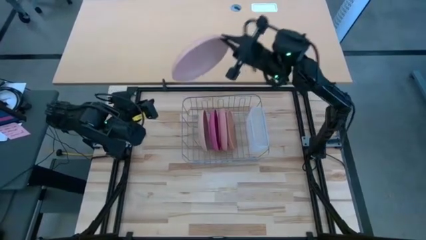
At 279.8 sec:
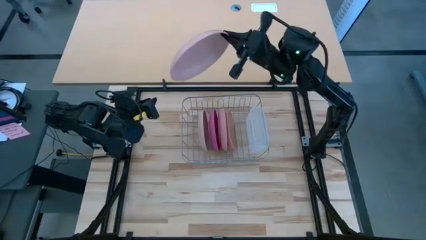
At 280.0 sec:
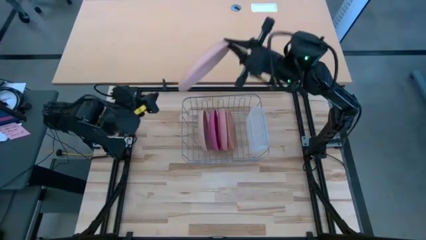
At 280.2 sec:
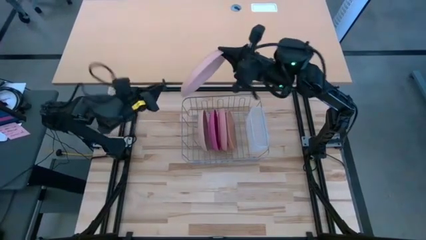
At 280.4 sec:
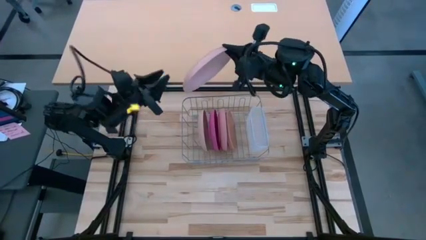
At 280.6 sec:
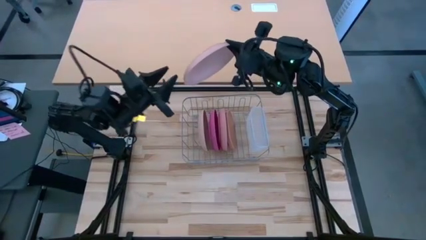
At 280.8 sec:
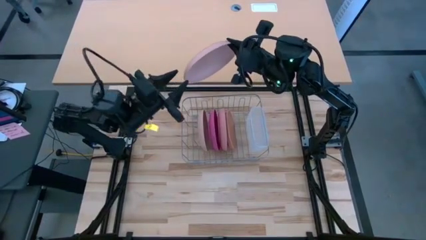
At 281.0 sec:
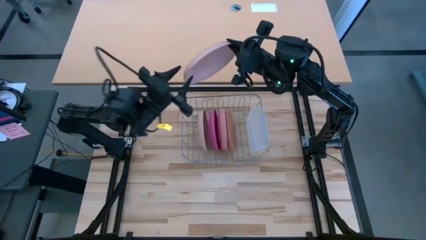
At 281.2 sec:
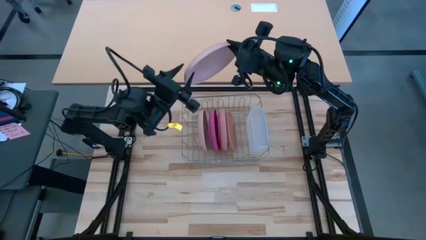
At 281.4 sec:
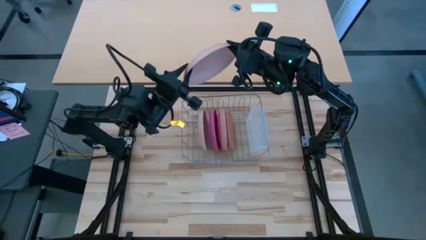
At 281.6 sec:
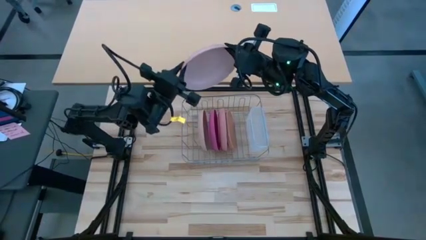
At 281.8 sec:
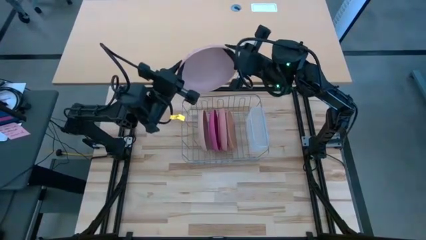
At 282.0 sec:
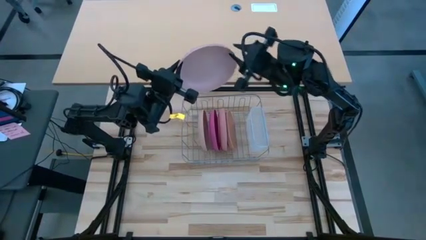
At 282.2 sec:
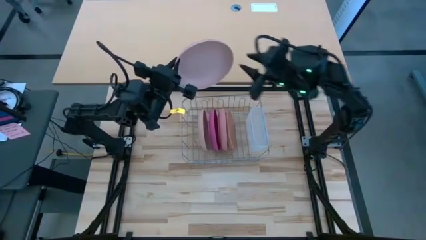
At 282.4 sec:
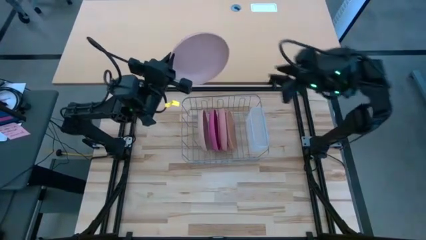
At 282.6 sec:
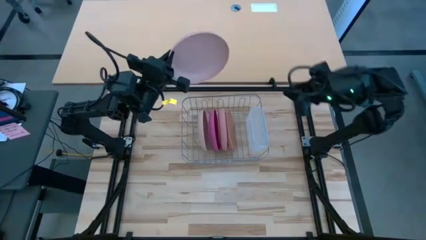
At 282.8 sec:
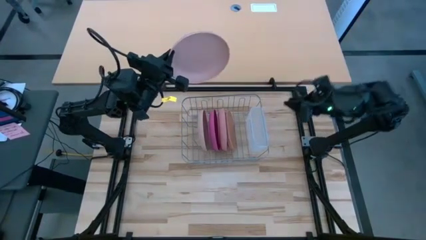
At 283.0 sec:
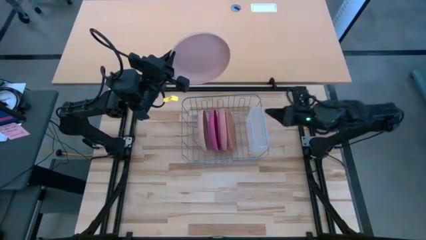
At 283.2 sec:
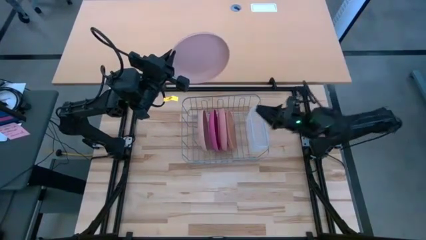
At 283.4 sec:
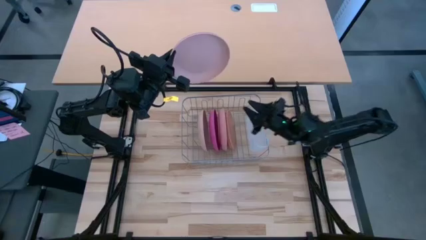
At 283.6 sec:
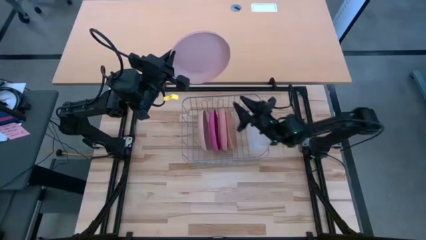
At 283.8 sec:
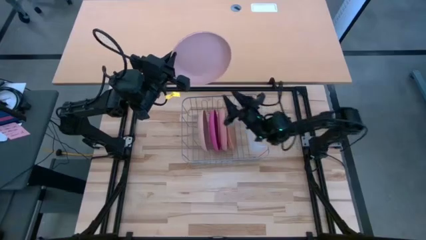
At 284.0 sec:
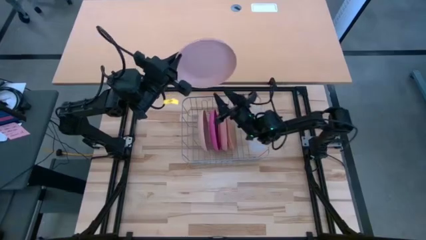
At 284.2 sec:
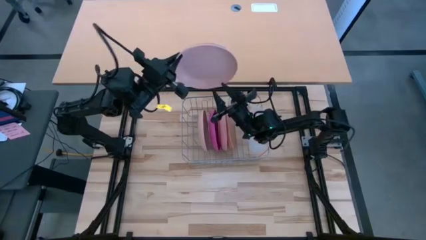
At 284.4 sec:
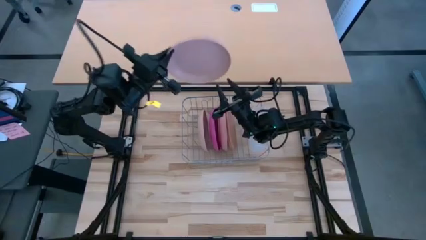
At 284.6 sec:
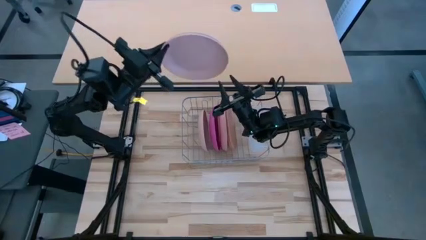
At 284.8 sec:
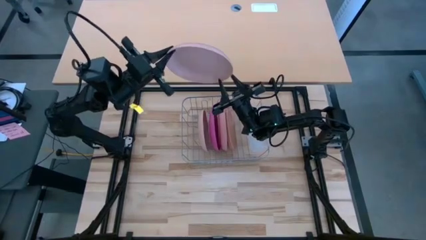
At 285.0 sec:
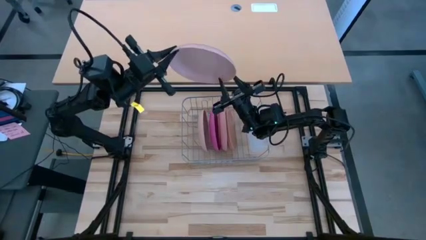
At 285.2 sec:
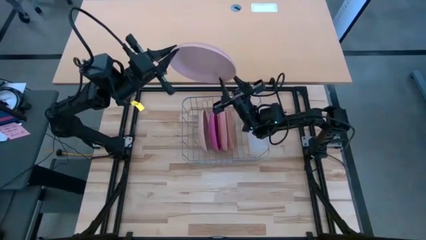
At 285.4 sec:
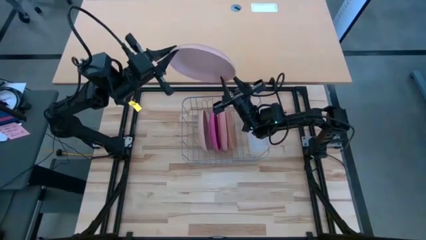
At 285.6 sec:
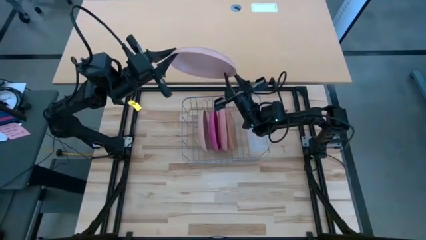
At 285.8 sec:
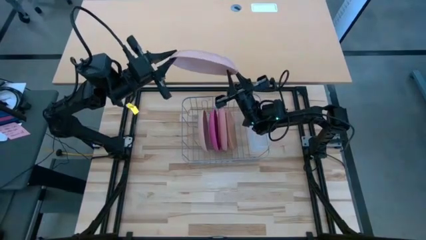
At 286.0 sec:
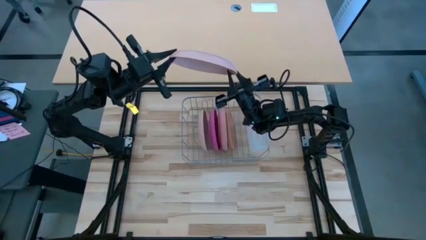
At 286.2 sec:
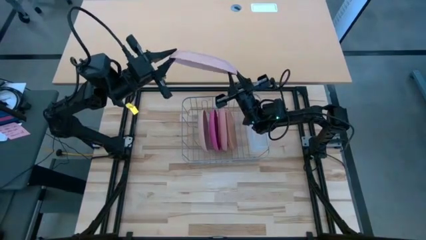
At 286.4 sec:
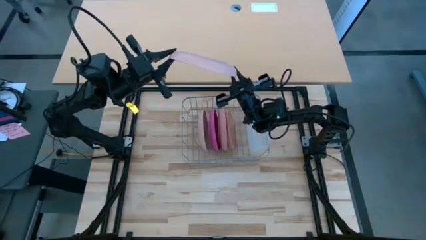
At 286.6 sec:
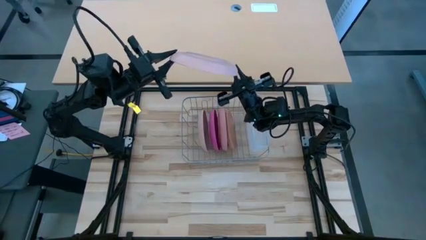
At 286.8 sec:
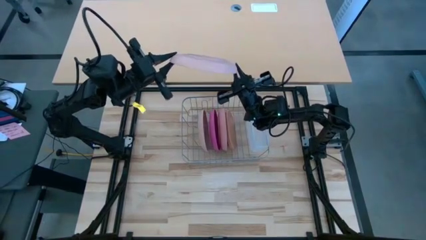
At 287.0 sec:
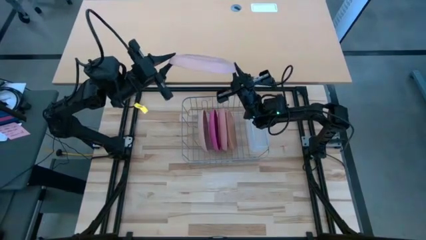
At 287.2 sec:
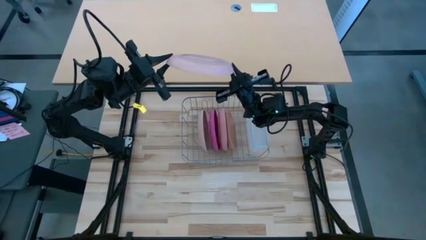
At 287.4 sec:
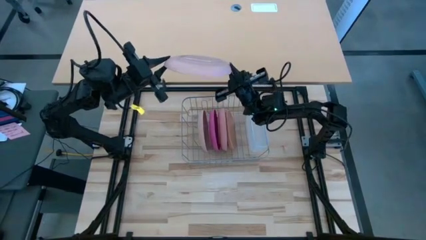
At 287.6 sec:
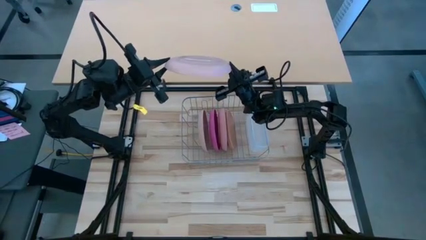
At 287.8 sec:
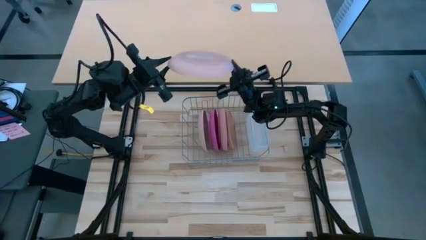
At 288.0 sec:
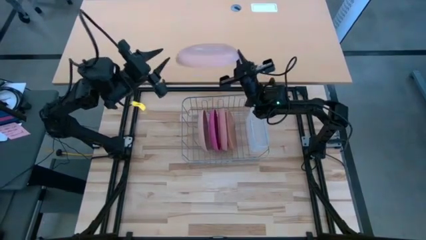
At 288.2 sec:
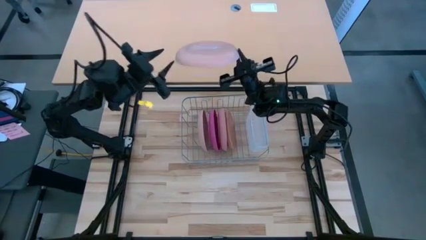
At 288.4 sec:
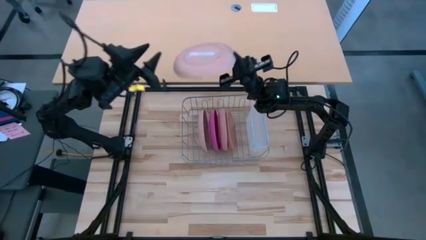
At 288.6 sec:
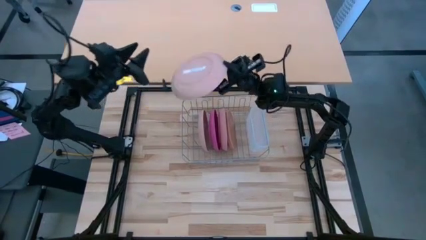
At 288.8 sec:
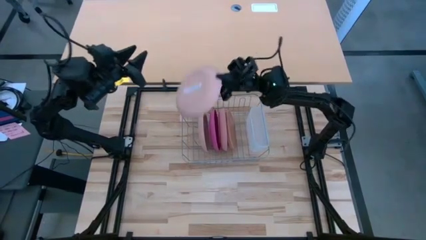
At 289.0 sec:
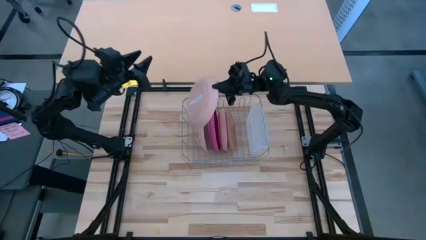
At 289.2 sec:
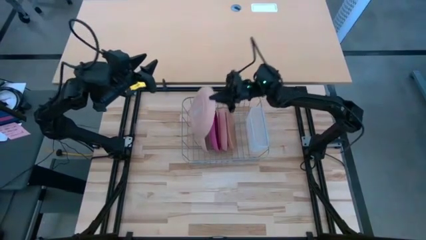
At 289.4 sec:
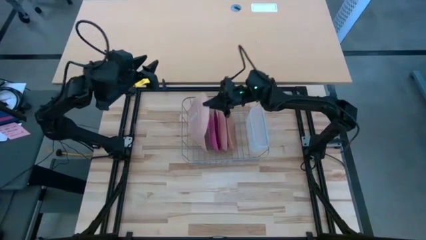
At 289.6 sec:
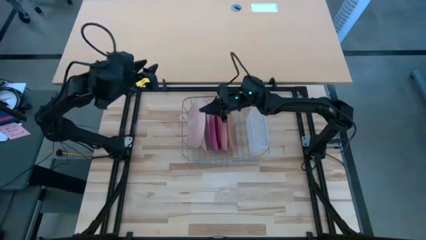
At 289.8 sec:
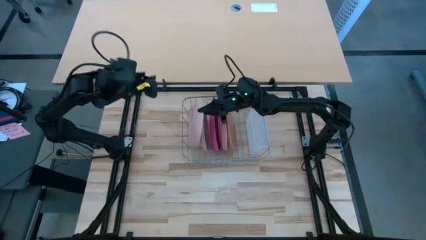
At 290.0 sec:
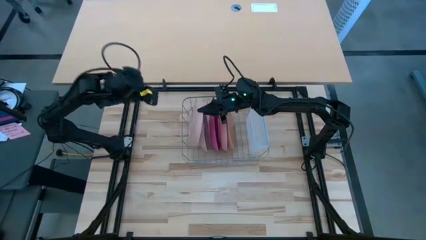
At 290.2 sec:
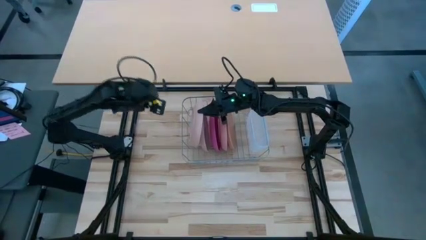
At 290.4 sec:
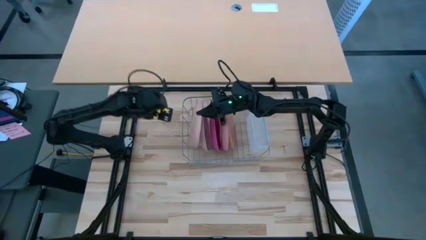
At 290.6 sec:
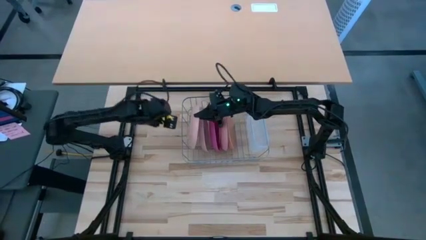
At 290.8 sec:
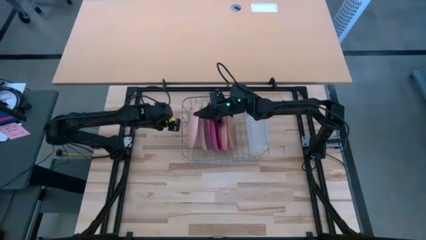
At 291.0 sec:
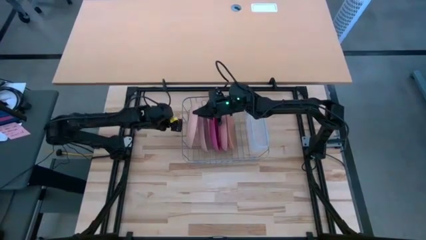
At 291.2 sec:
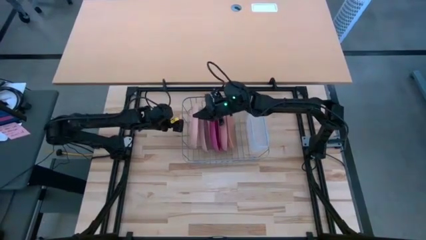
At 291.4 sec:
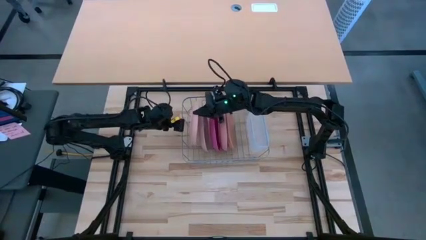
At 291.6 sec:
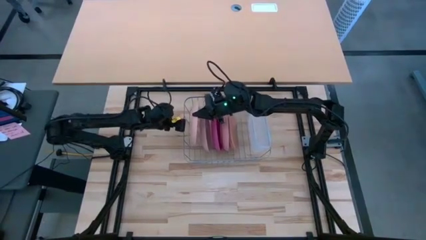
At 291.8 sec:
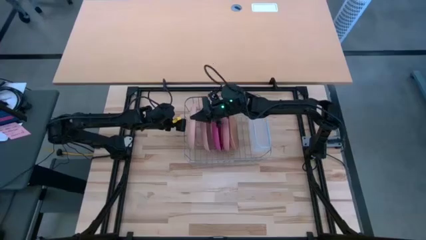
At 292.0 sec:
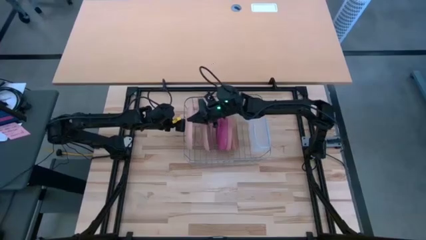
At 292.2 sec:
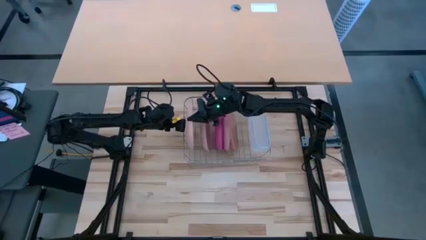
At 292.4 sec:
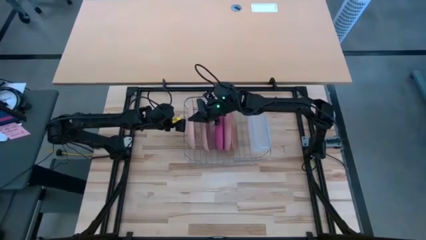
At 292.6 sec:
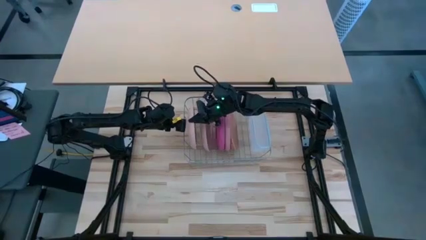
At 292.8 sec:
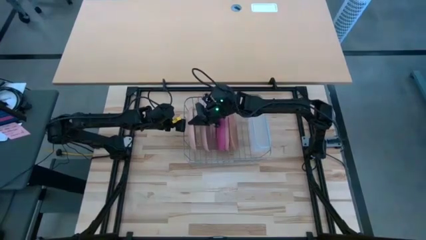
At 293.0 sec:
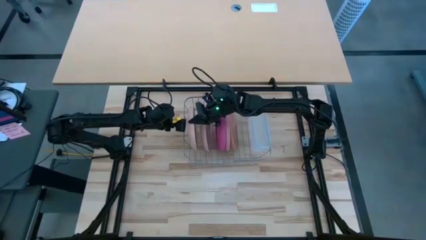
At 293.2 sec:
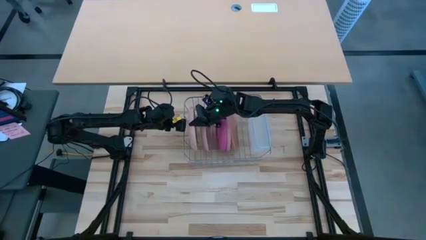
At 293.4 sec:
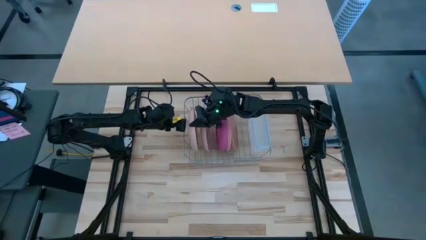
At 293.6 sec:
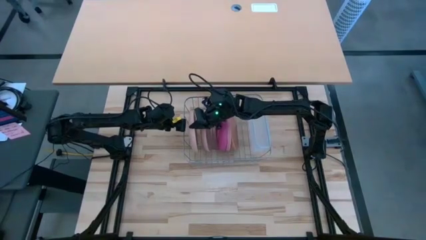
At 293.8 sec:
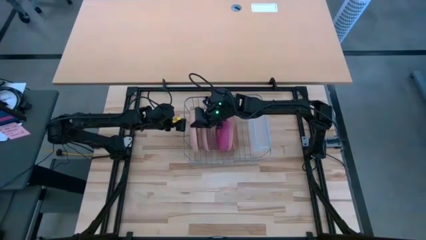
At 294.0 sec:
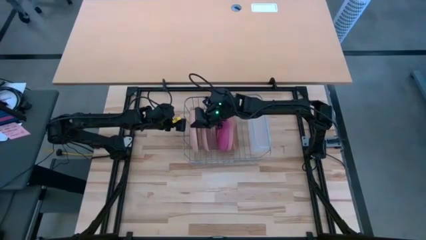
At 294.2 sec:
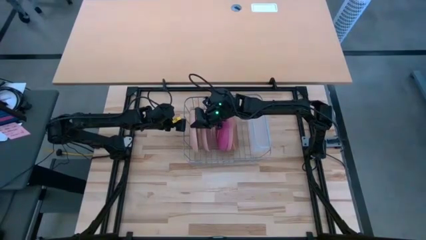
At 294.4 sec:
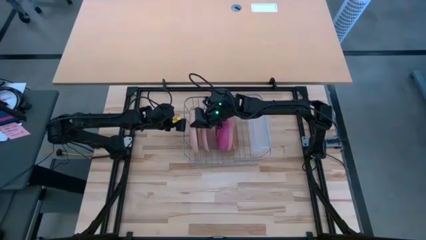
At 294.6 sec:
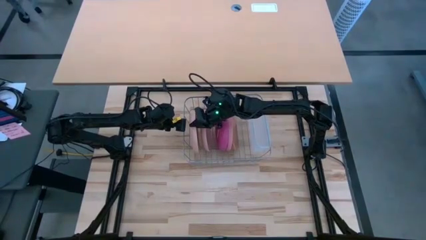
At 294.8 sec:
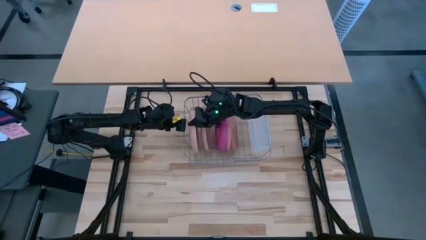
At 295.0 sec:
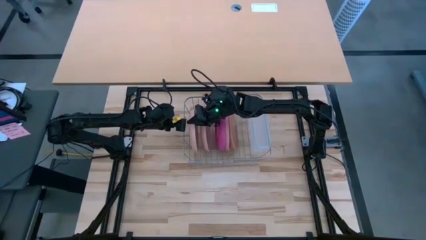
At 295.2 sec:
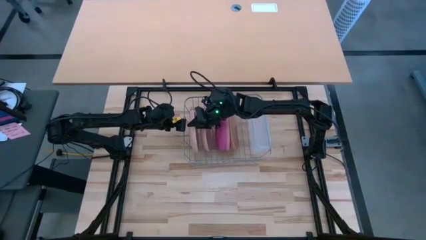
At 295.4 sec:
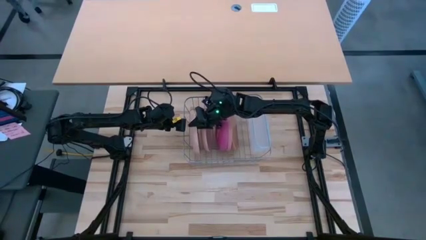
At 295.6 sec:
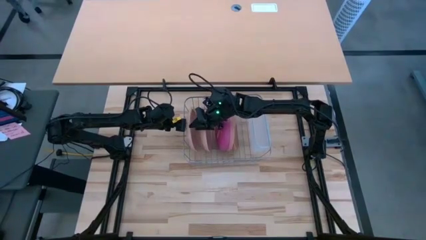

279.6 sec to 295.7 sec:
Task: Sort dishes
Put the beige plate in the dish rack
